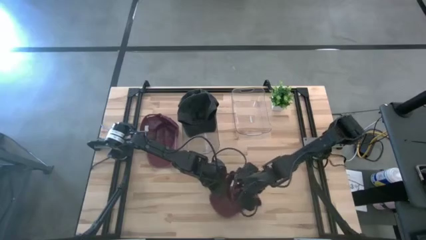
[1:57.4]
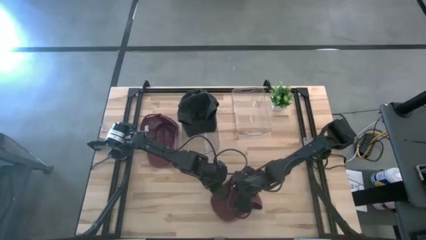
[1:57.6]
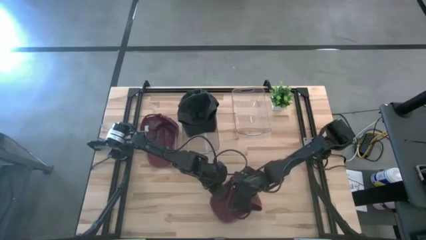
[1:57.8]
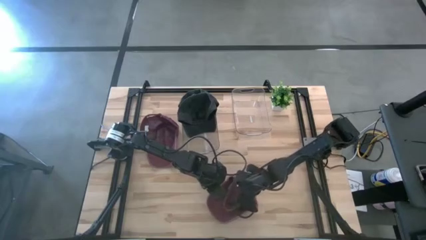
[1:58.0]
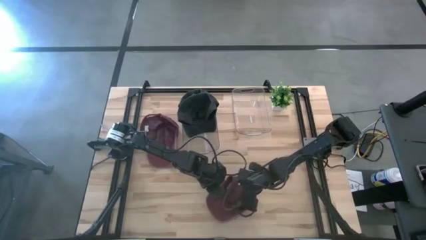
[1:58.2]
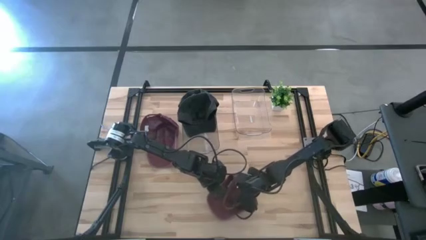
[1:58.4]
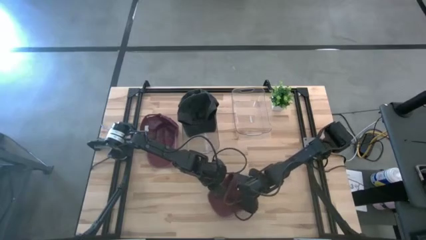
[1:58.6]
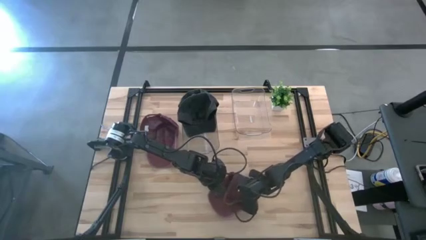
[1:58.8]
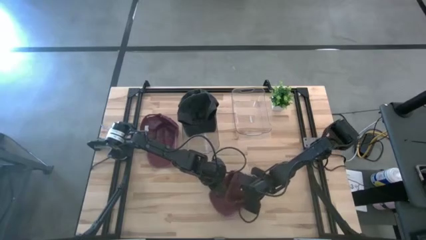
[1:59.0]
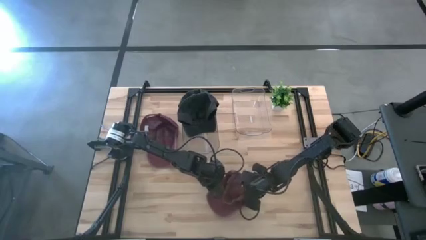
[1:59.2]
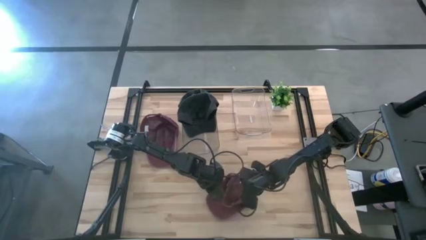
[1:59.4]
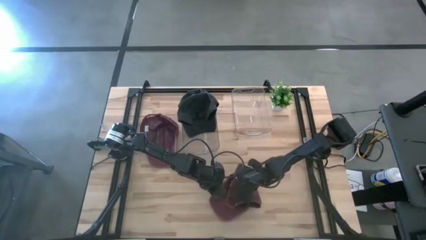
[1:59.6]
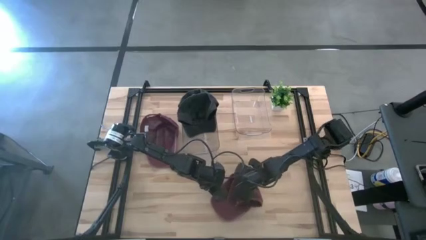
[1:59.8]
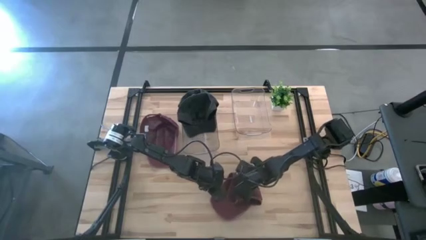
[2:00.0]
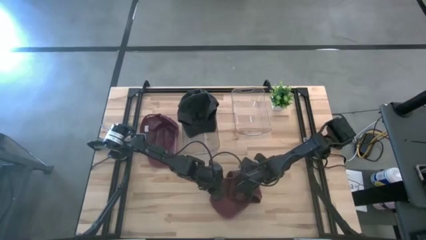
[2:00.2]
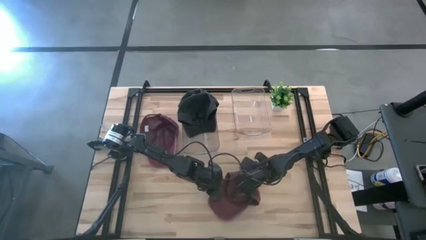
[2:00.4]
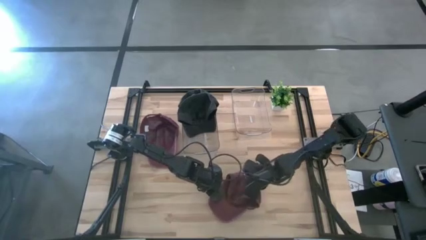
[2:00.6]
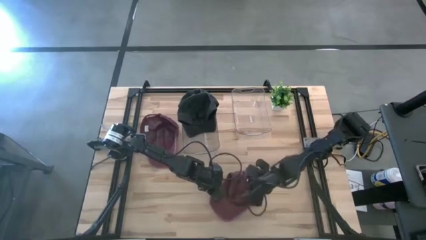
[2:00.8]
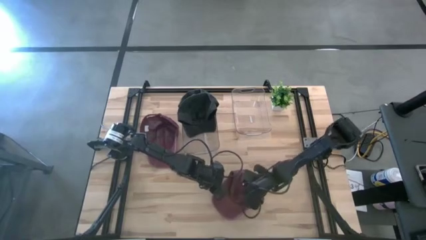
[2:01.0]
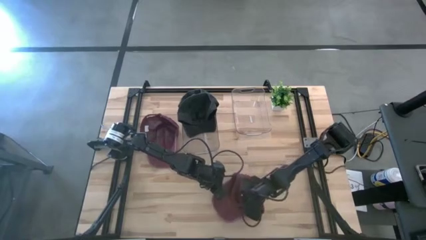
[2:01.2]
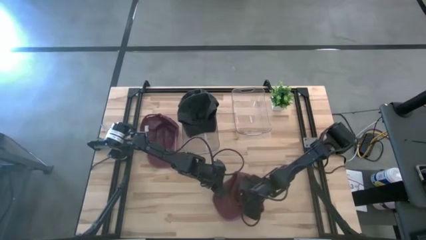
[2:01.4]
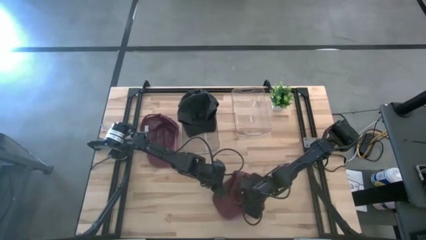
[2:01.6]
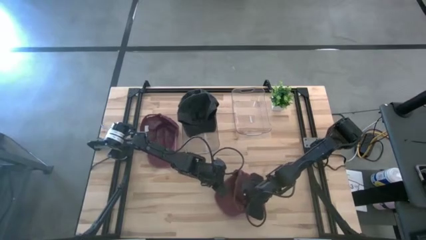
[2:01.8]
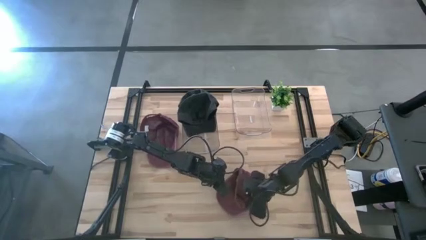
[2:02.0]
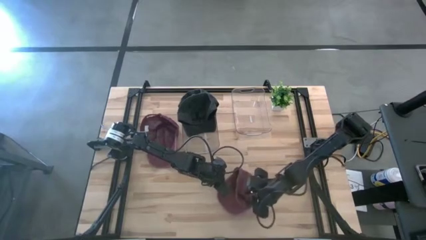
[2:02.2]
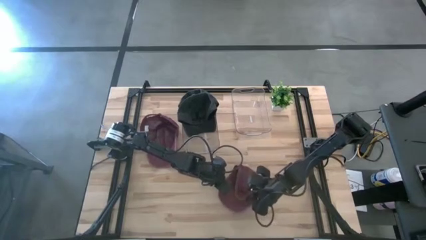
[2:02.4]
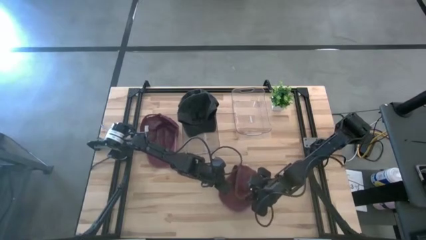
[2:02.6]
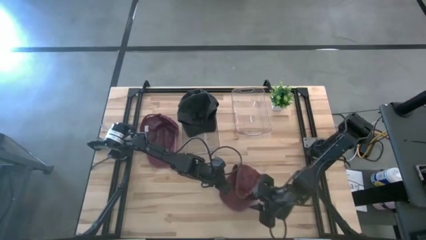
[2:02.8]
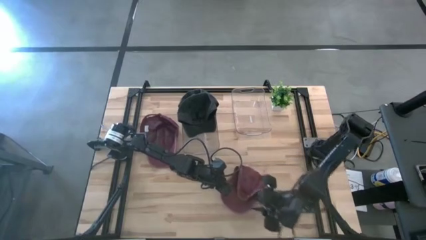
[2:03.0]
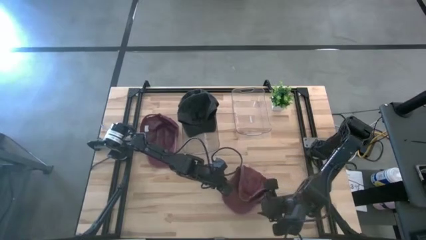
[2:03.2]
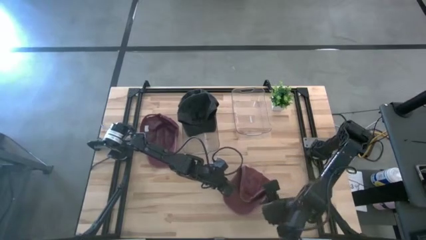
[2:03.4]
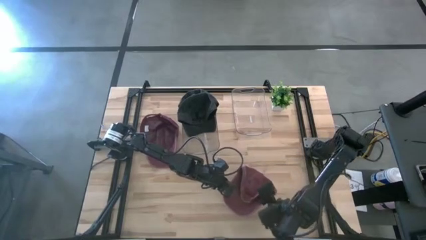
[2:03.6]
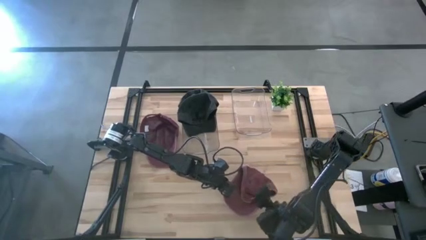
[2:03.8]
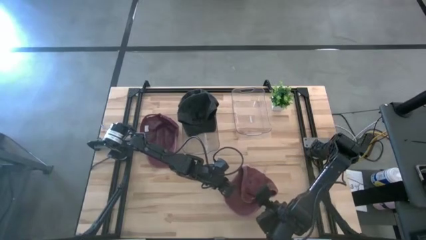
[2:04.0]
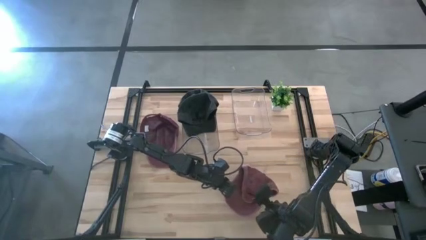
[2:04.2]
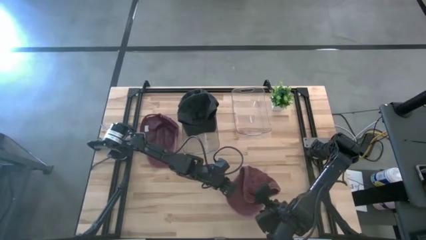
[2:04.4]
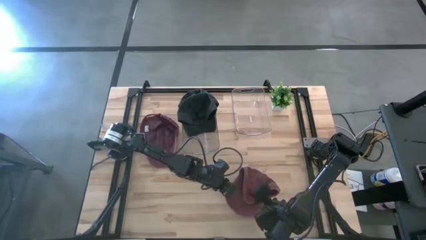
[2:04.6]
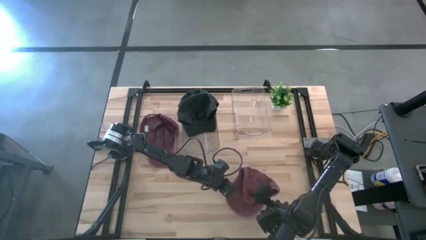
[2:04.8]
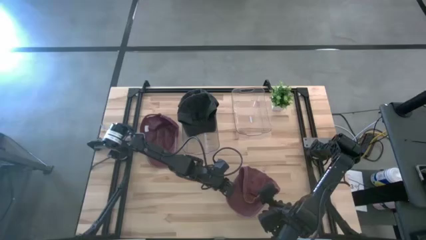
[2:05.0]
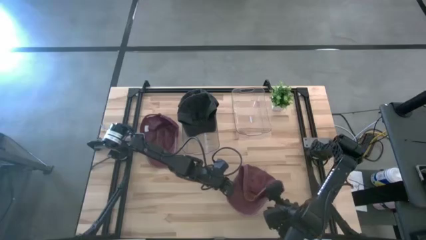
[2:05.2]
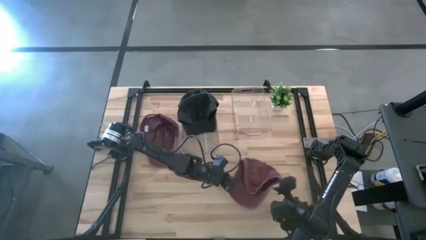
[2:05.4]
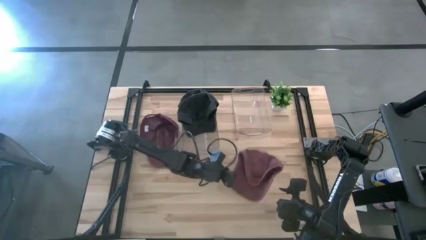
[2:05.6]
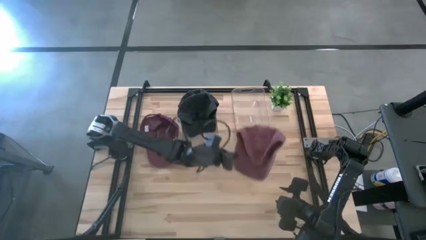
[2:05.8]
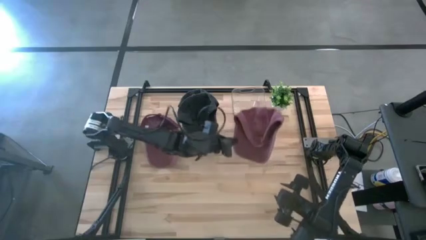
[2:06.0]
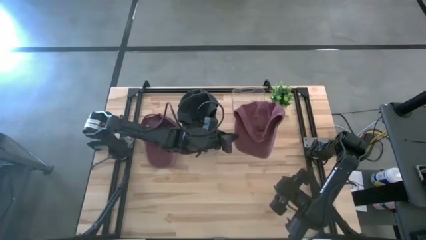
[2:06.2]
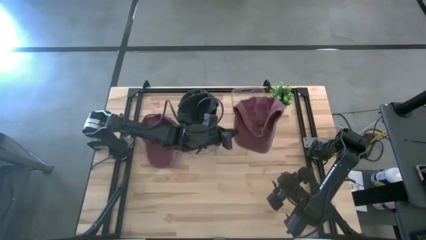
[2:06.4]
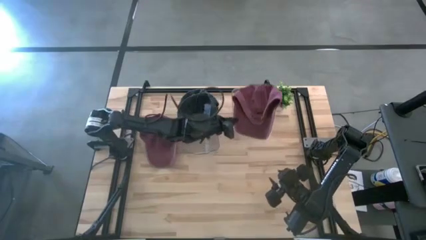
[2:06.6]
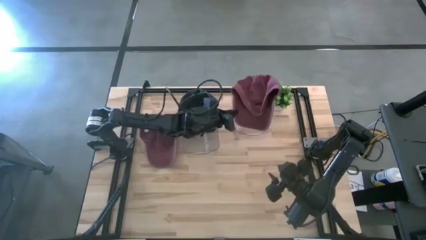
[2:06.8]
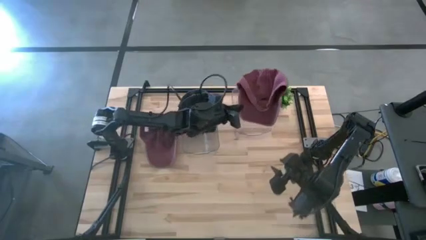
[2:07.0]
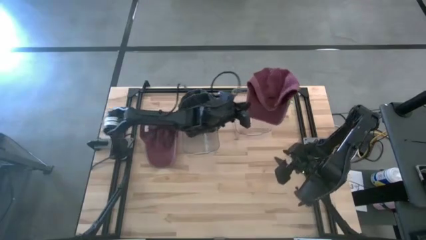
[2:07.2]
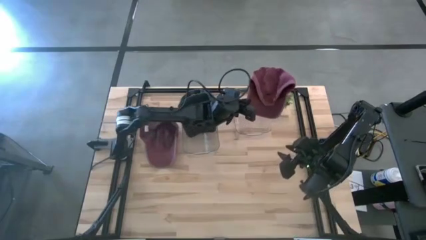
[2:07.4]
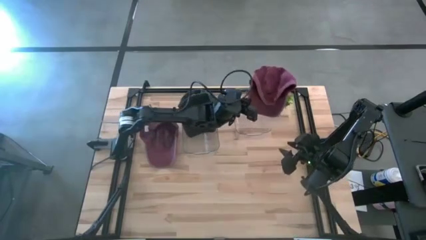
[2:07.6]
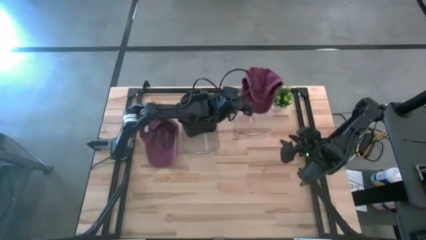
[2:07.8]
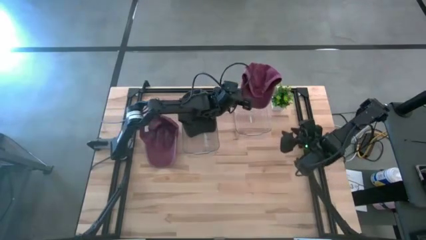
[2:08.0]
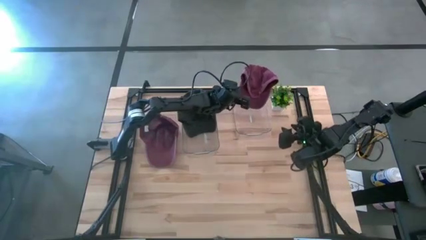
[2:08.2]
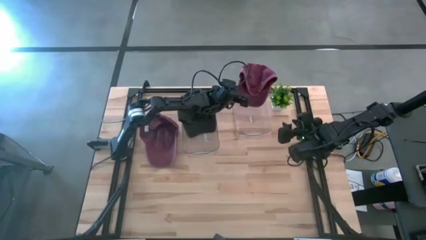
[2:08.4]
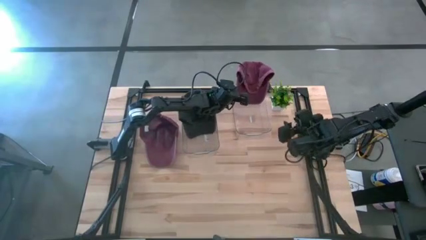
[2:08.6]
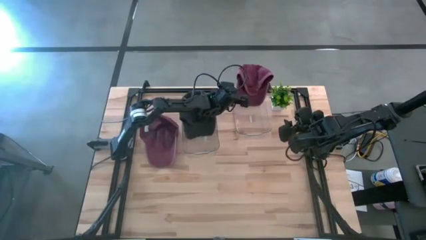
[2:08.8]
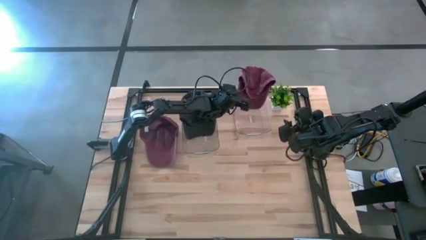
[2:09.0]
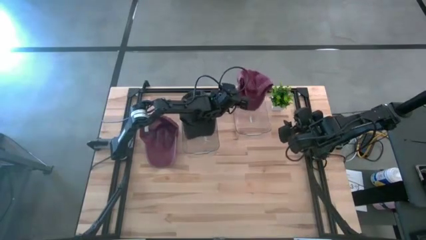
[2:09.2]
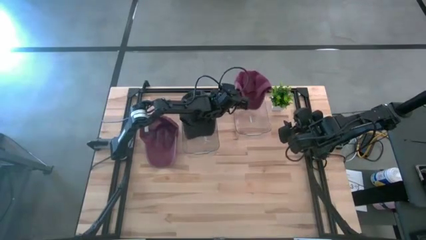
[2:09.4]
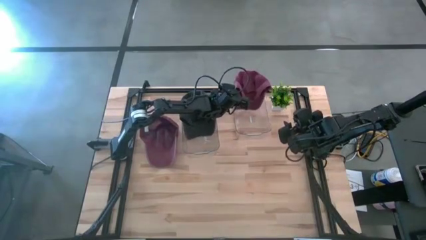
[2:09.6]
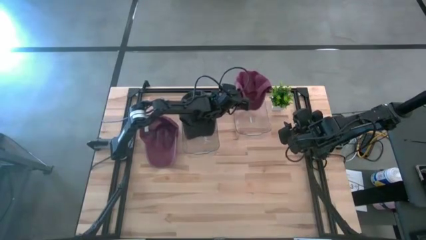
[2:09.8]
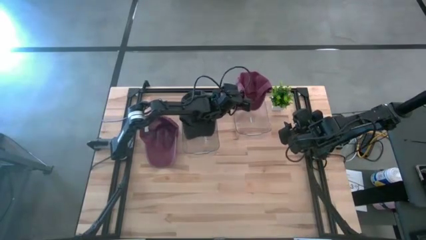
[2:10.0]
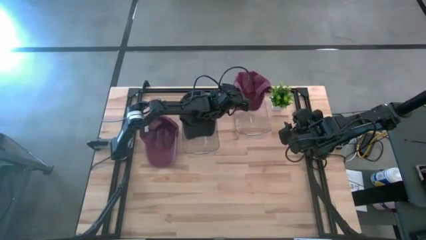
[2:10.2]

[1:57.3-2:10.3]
Task: Pick & Place hat
Put the bottom red cap into the right transparent bin

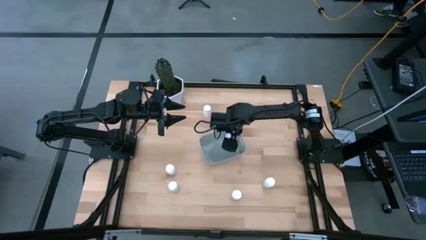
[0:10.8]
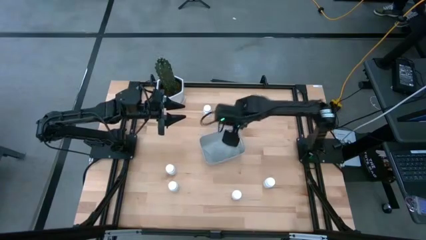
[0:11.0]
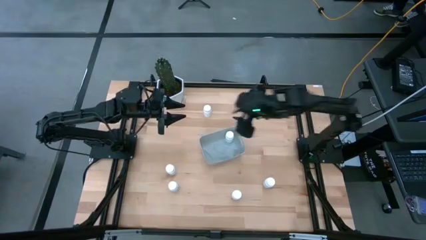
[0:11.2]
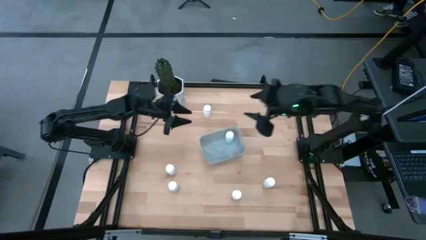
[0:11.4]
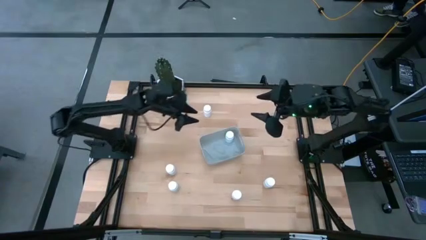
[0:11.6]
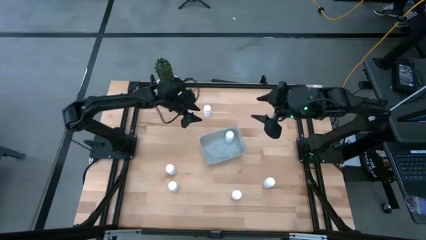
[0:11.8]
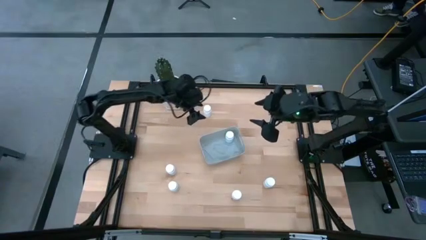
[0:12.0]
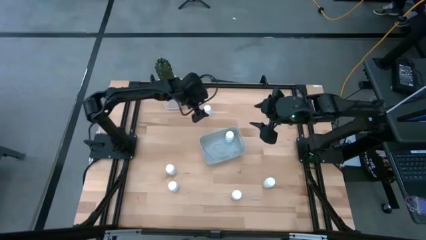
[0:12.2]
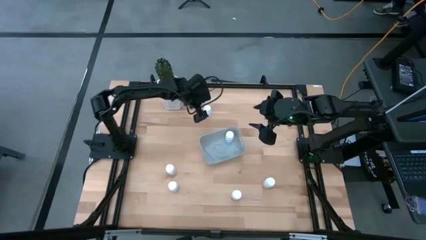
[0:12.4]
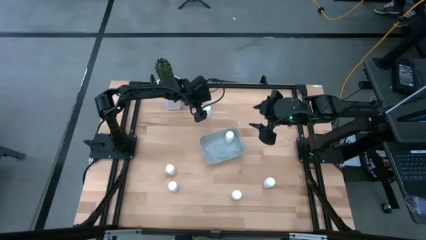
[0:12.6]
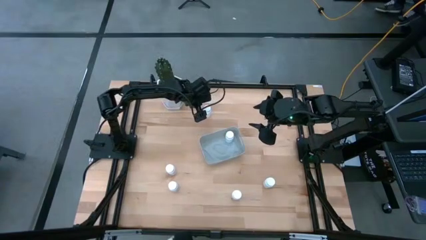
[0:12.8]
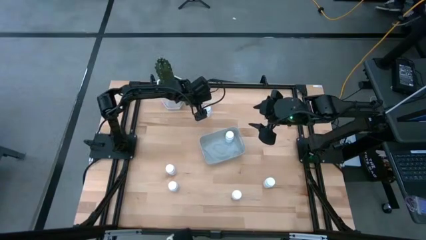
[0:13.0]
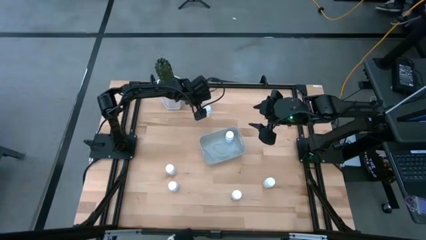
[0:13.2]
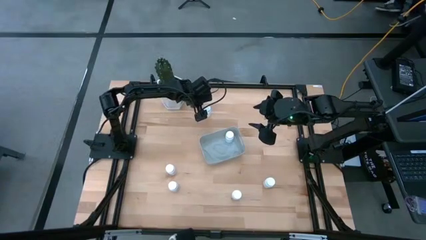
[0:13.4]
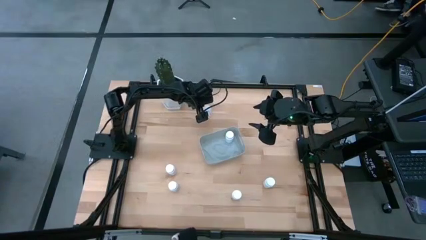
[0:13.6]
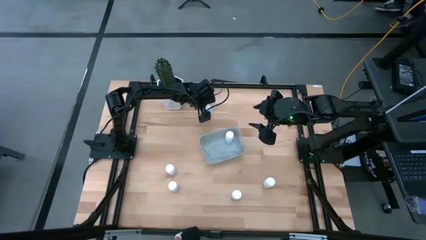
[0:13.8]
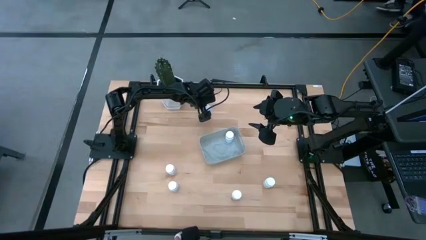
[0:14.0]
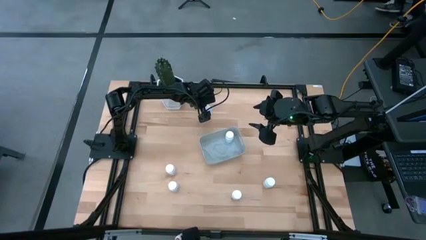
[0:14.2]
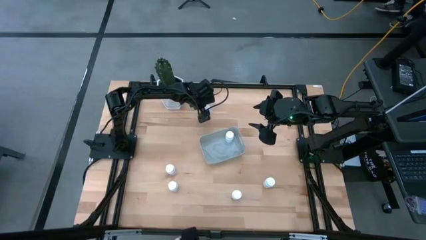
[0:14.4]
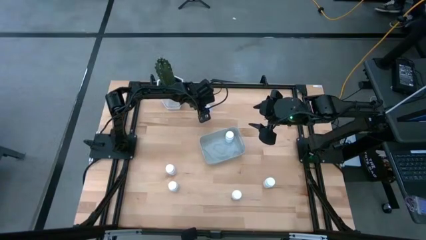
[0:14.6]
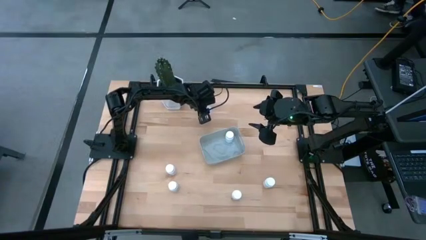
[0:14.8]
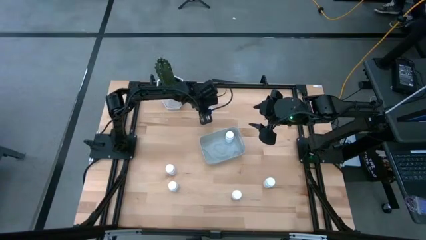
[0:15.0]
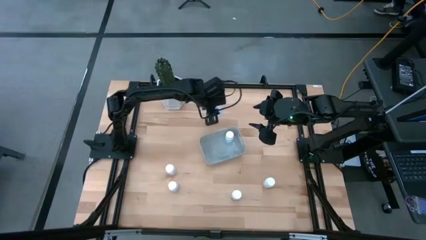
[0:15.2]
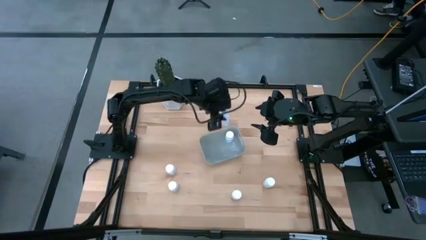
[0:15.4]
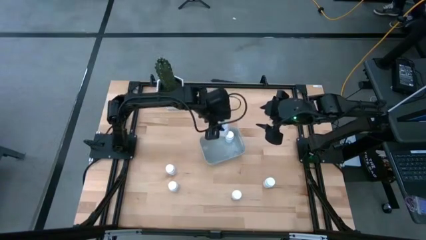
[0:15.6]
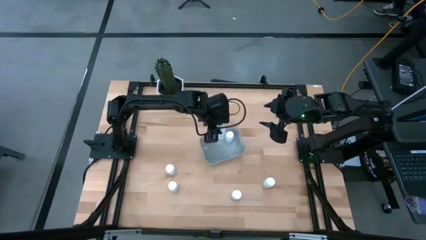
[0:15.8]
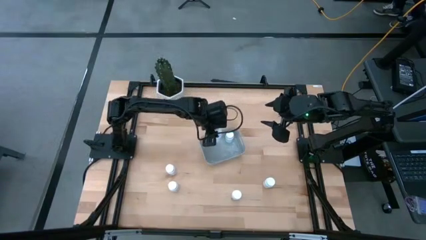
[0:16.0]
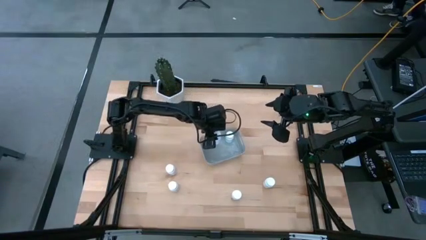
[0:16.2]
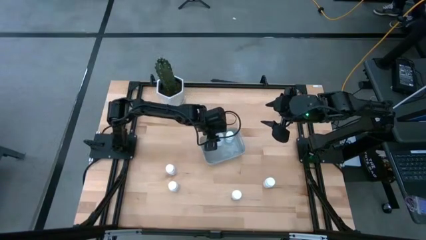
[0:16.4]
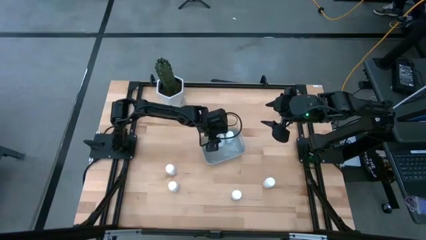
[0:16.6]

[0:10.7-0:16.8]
Task: Pick and place pill bottles into a basket
Put the white pill bottle into the gray bin
